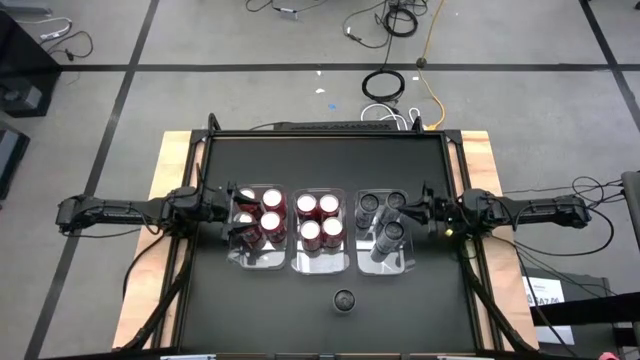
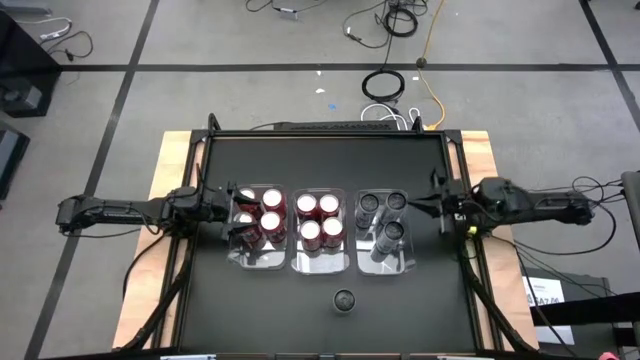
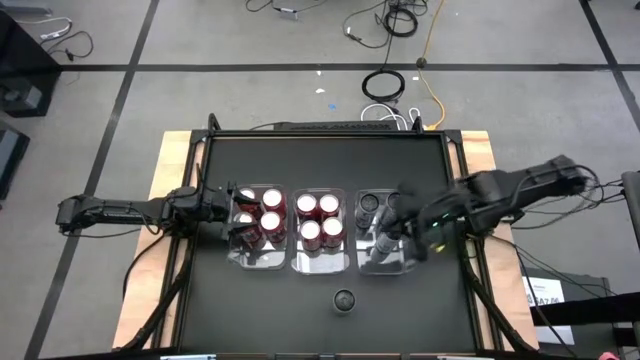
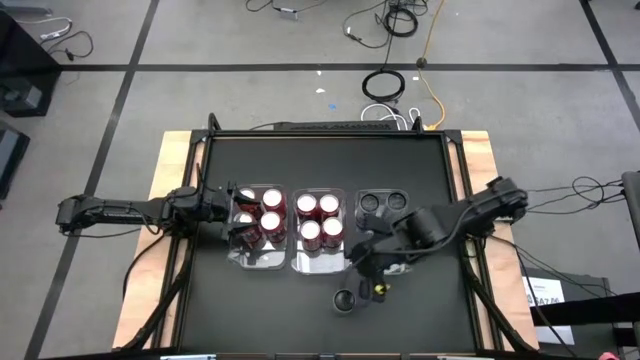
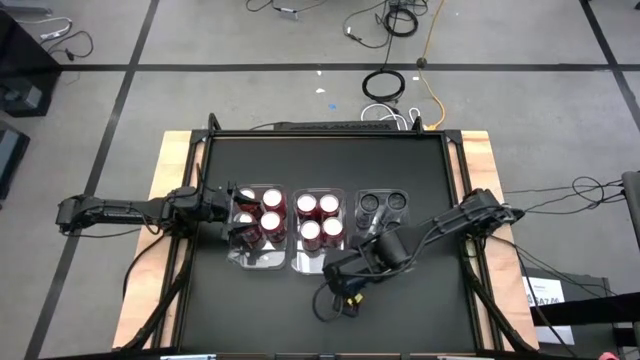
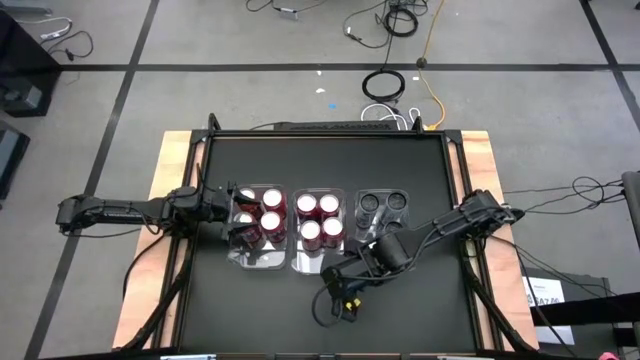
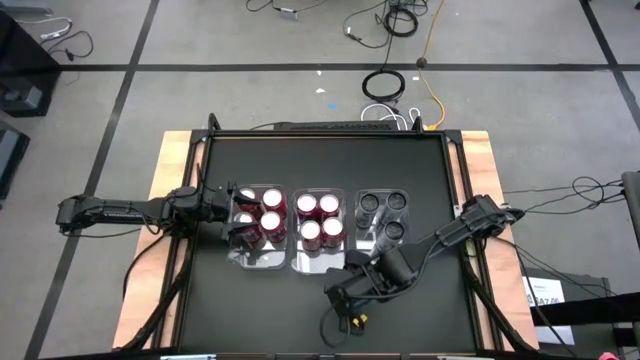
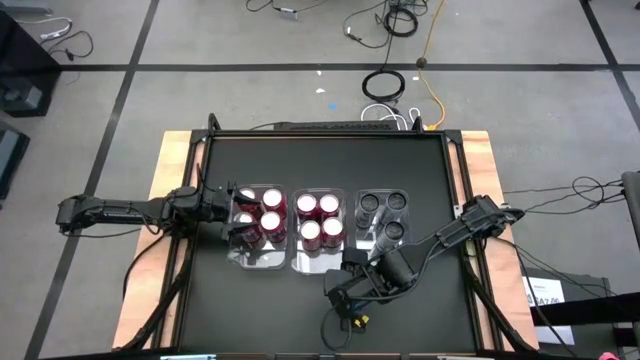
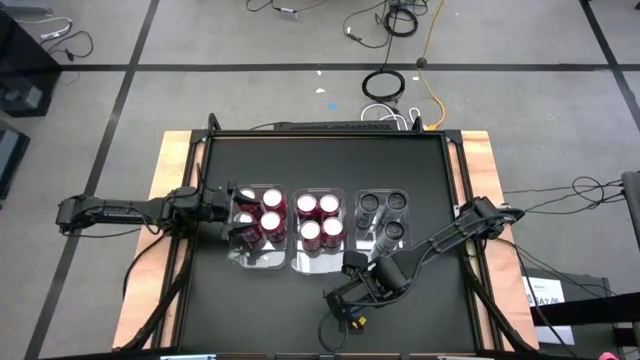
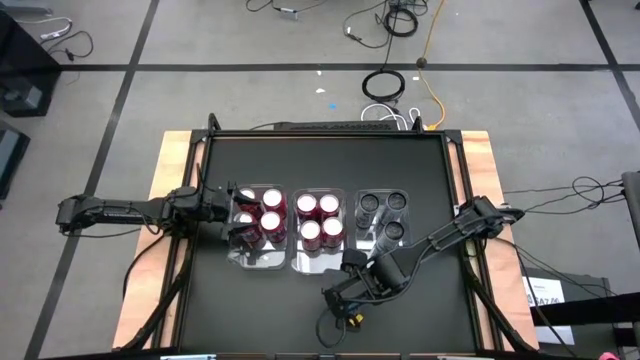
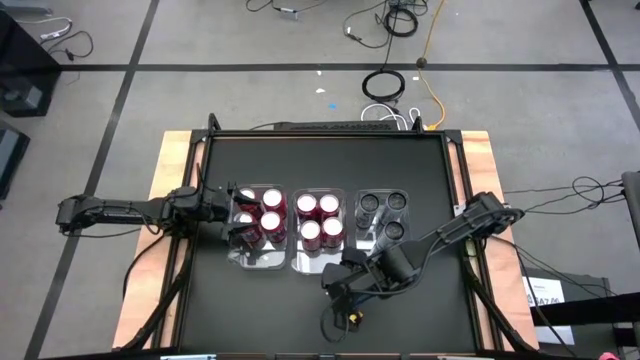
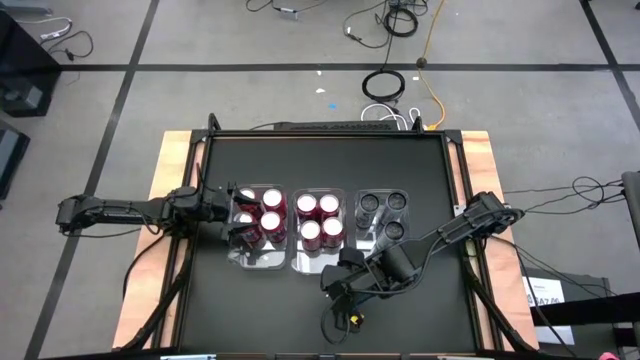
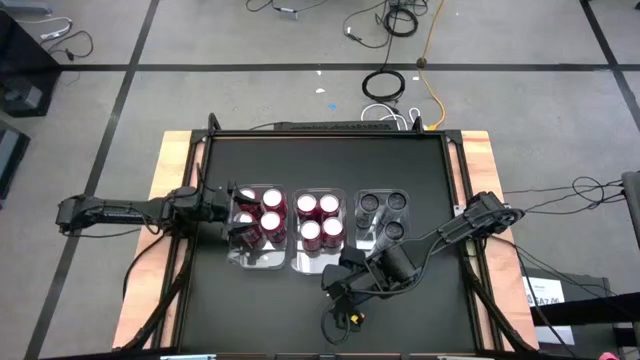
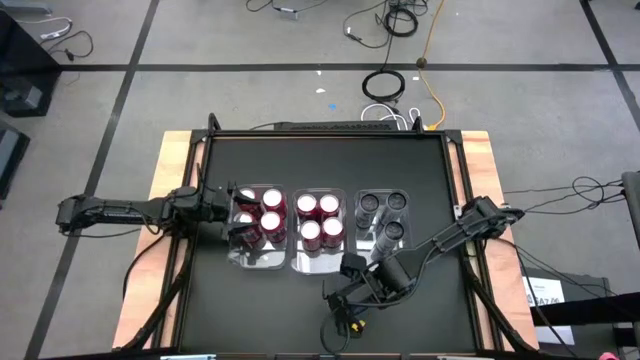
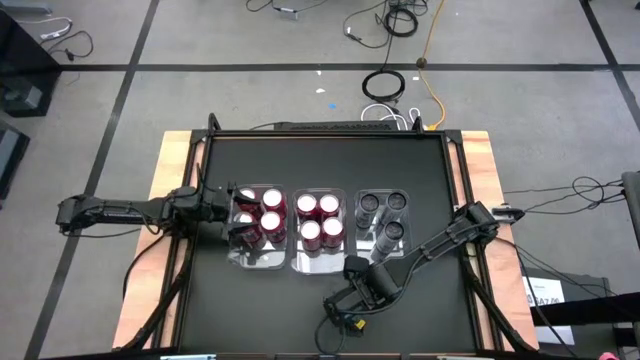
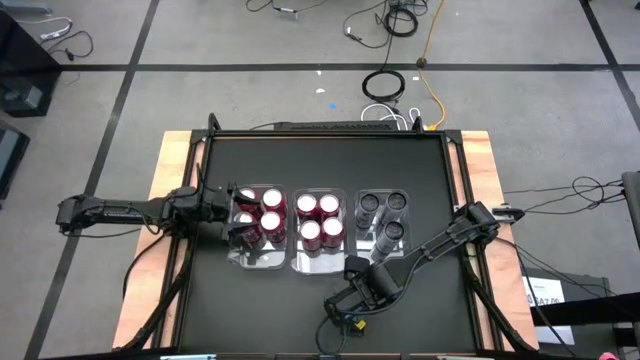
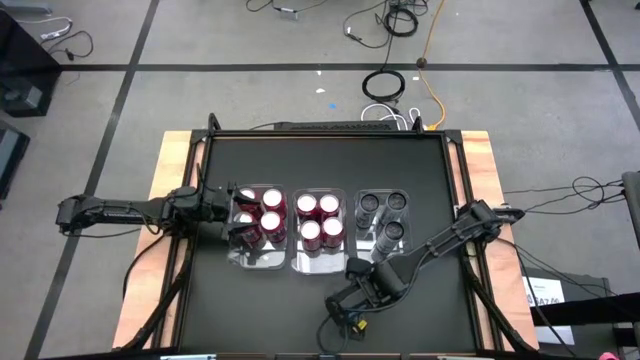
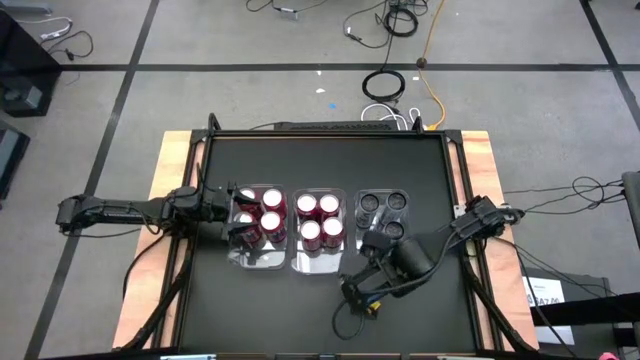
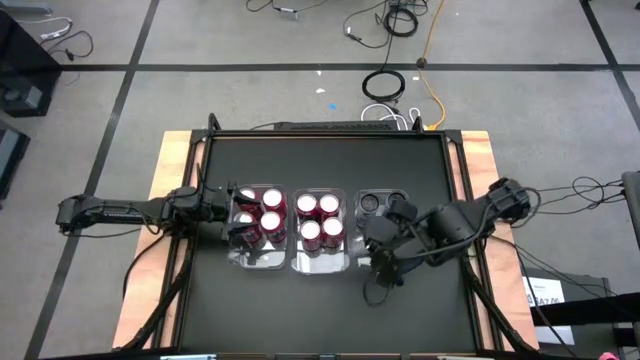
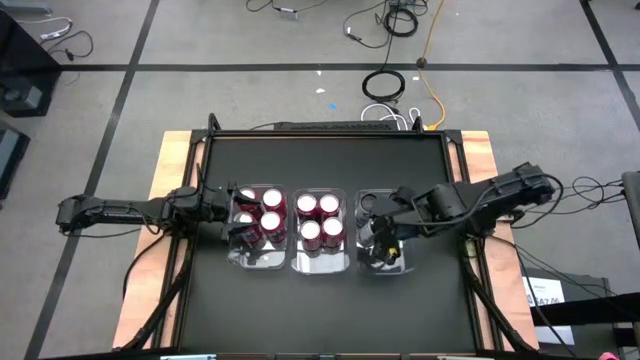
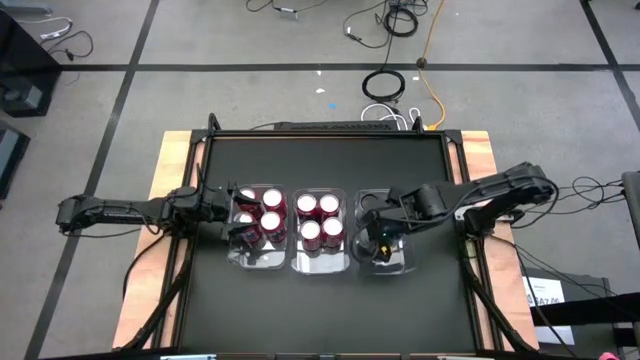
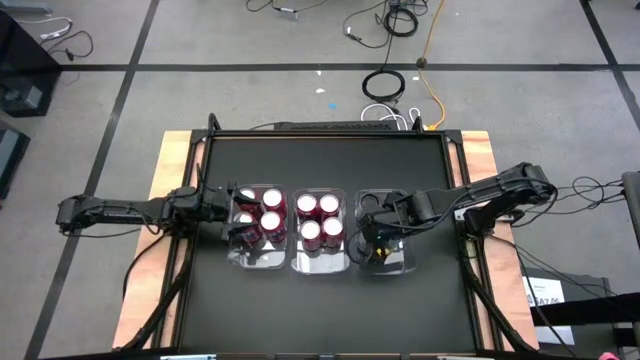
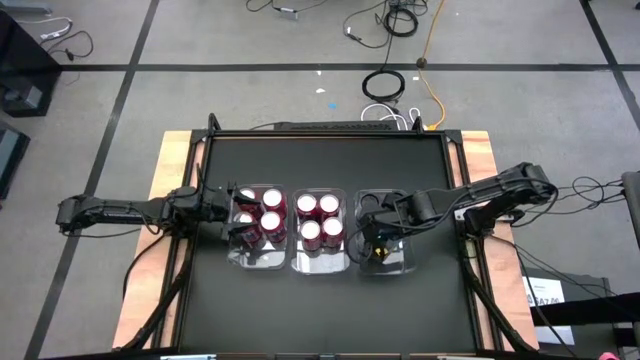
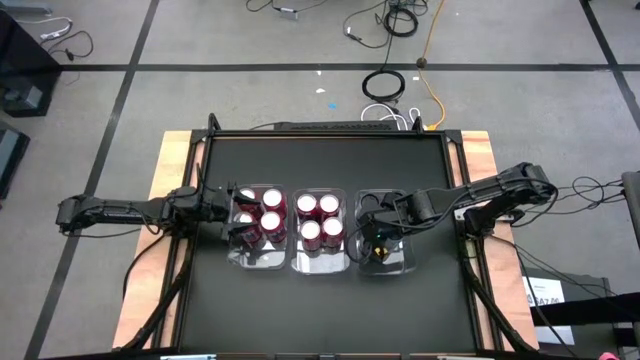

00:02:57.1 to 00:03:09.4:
Task: Sort soda cans
Put the white blue soda can into the right transparent bin

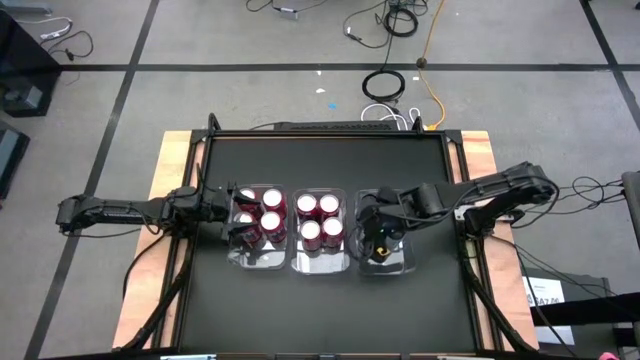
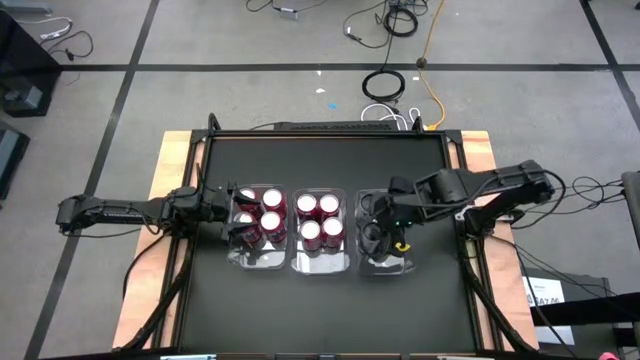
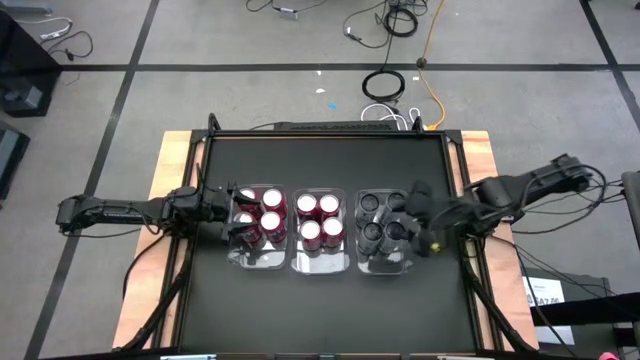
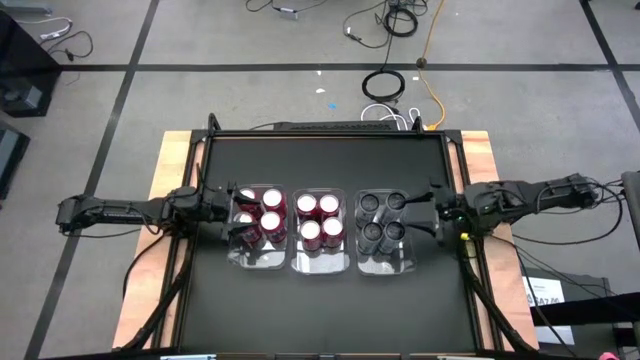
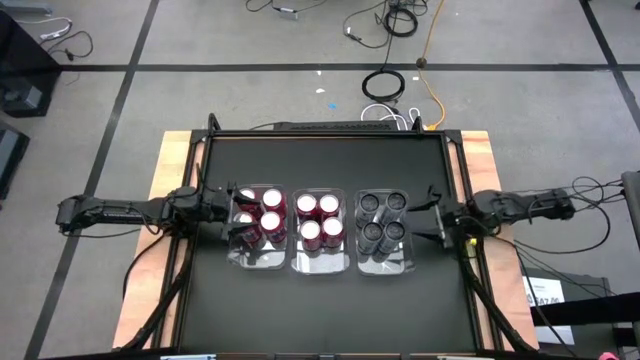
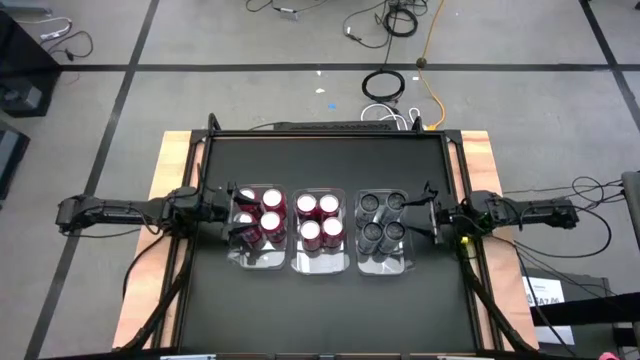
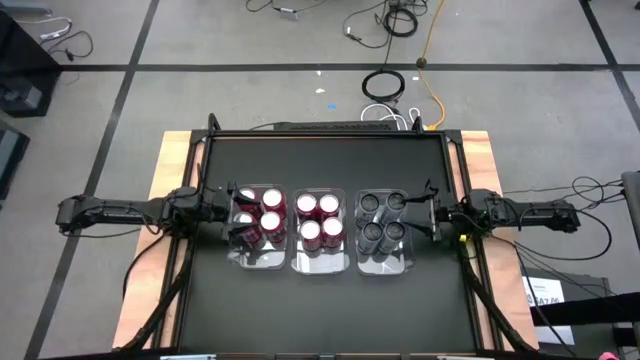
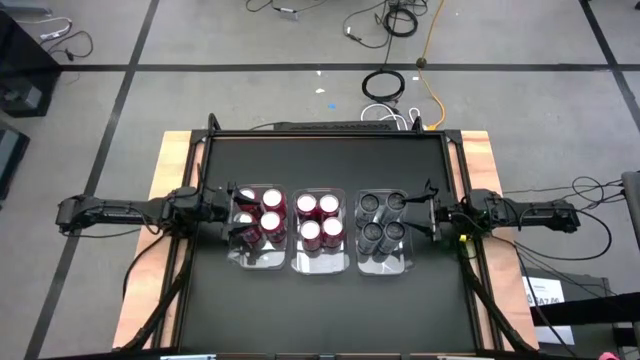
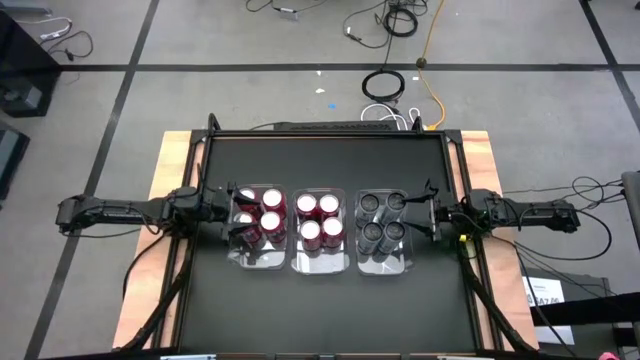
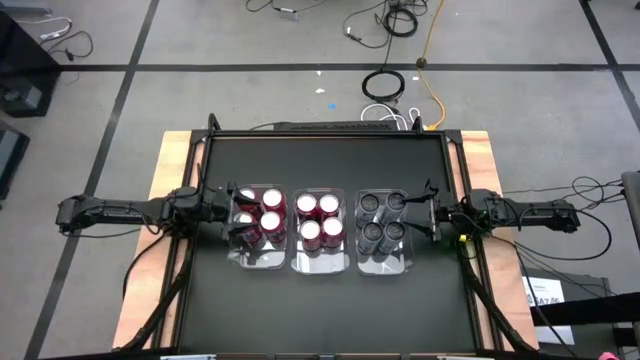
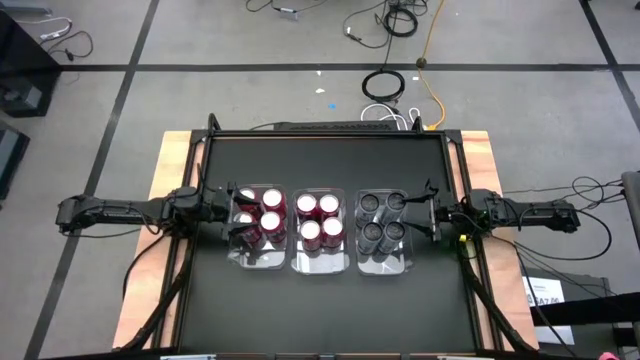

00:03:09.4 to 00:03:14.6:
Return to Home Position

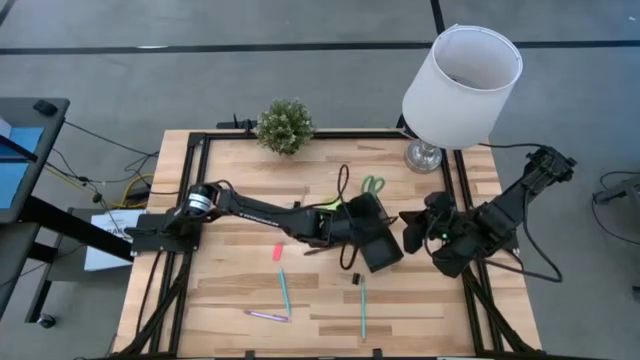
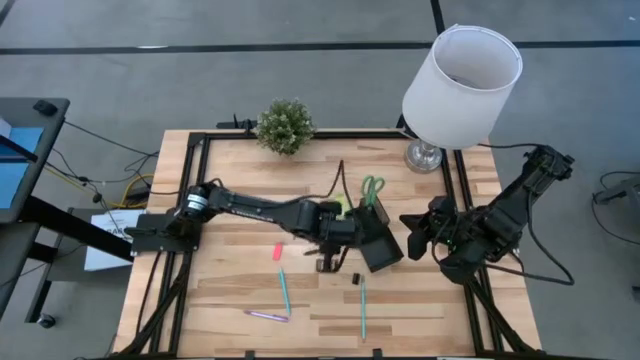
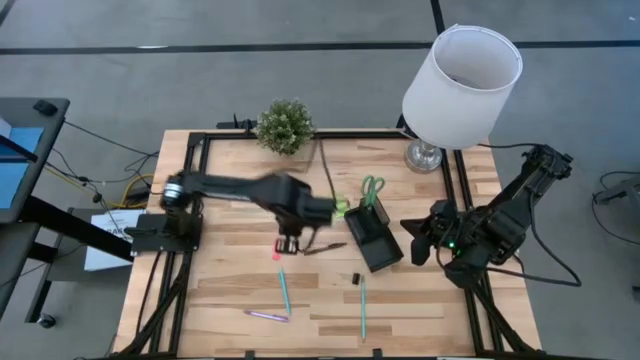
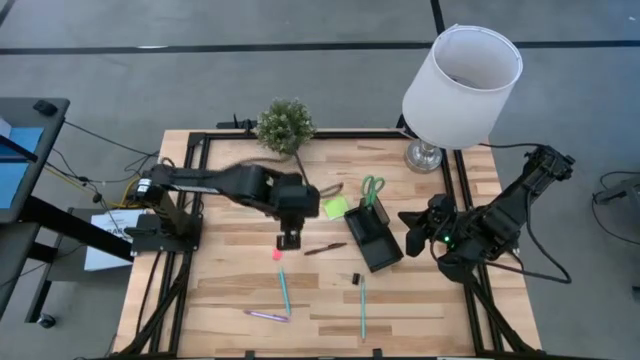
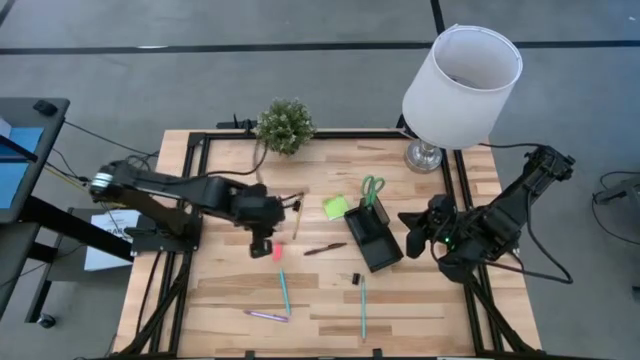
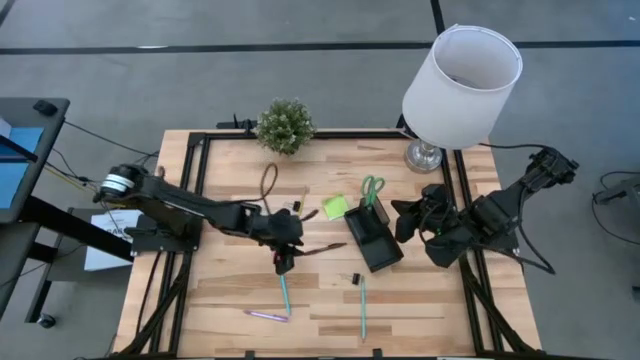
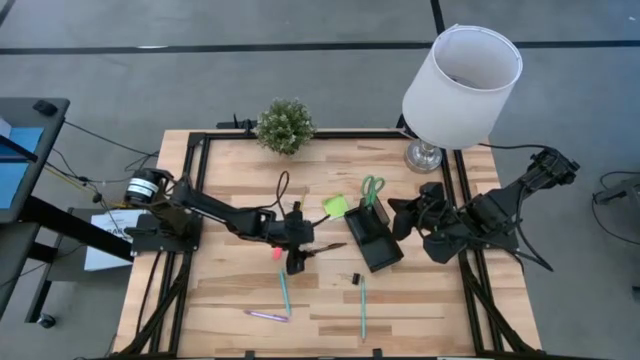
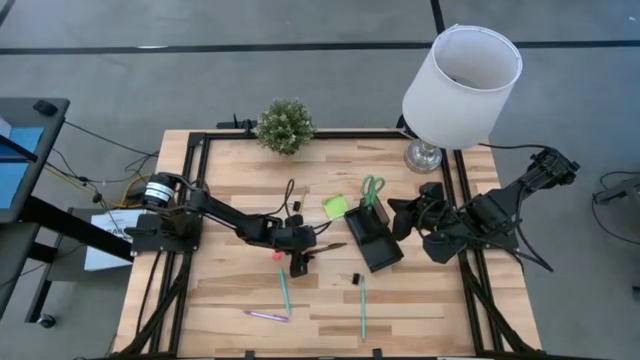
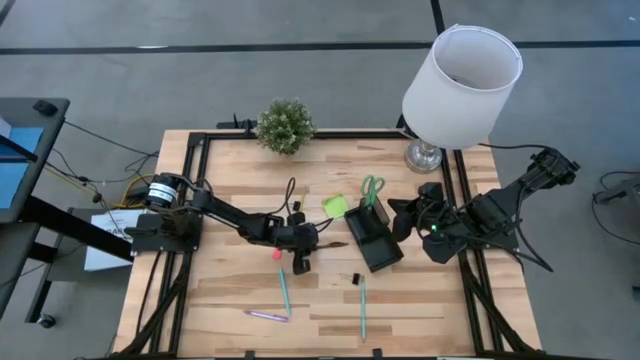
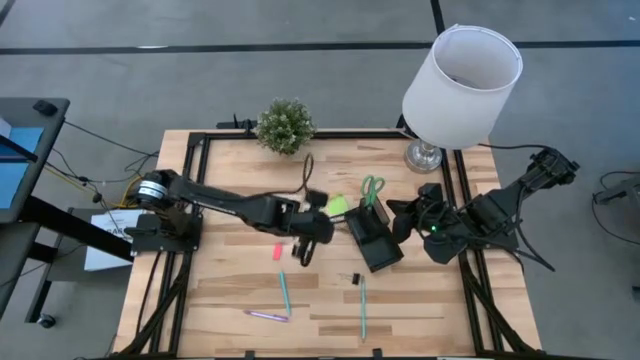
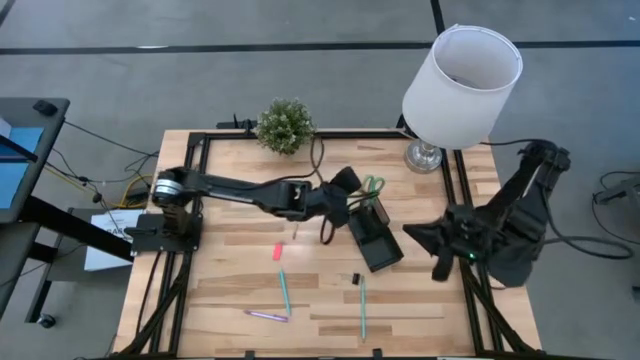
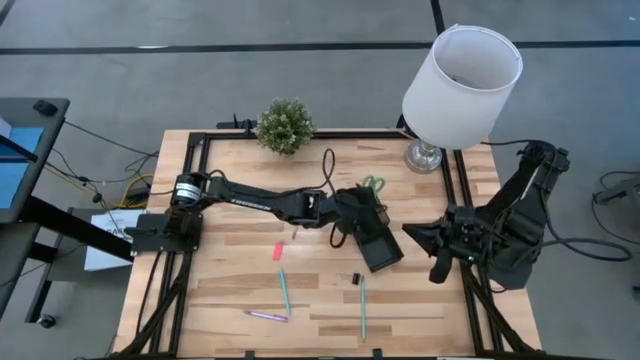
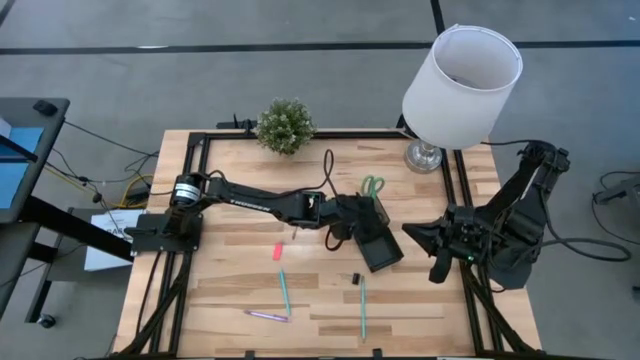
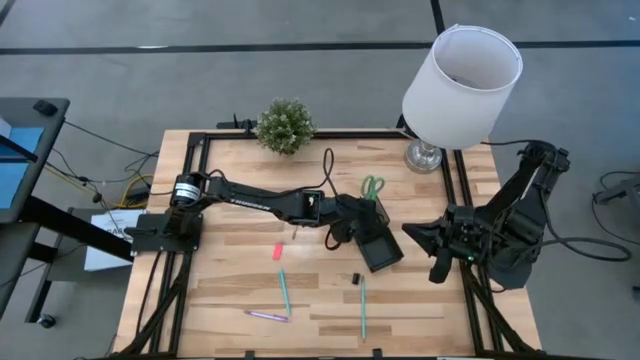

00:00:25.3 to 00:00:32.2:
Task: Pick and place office supplies into organizer
Put the brown pen into the black desk organizer
